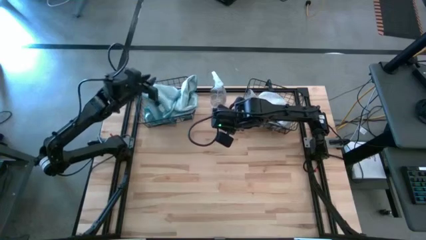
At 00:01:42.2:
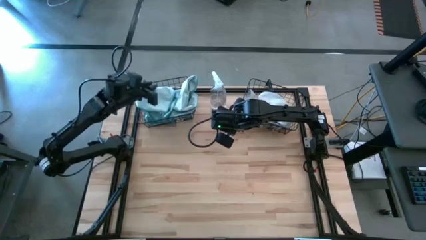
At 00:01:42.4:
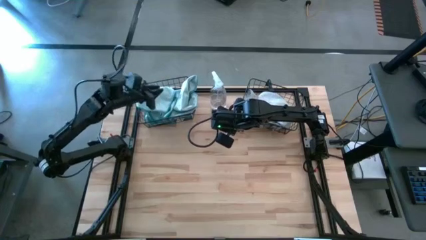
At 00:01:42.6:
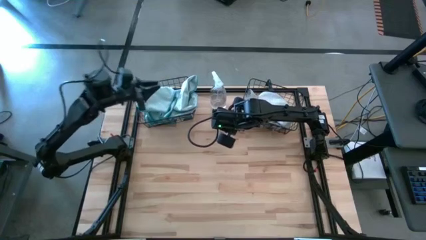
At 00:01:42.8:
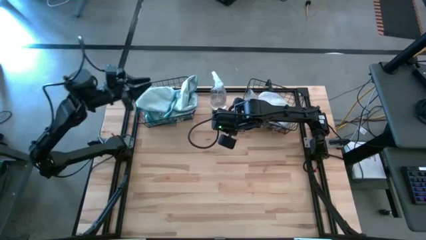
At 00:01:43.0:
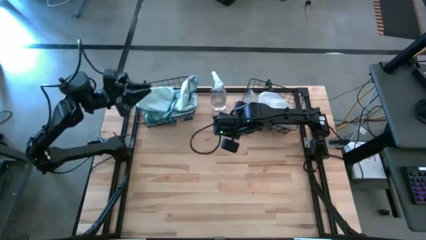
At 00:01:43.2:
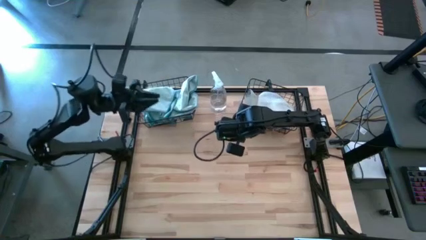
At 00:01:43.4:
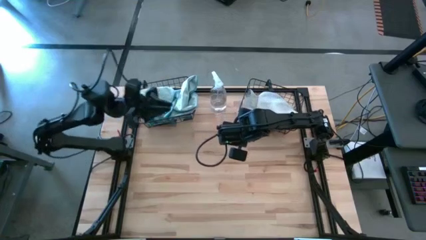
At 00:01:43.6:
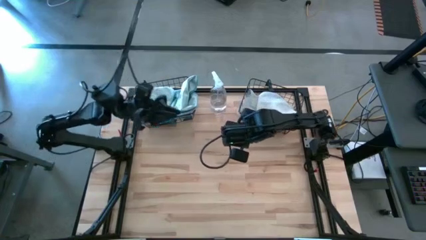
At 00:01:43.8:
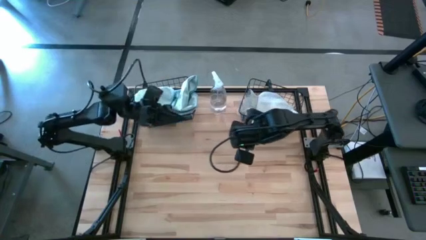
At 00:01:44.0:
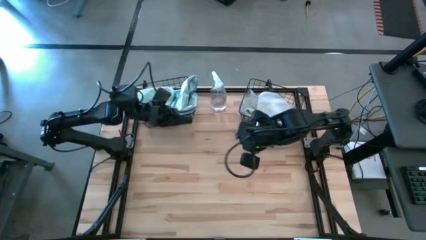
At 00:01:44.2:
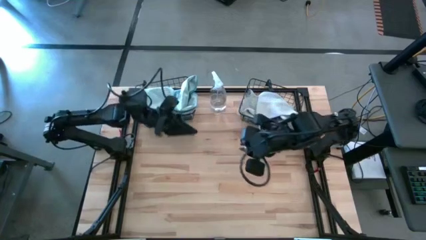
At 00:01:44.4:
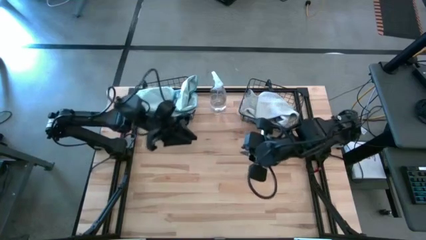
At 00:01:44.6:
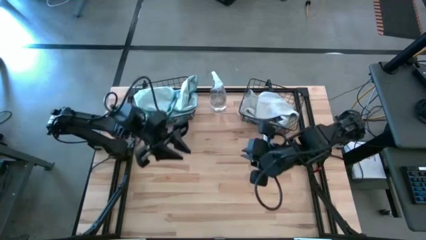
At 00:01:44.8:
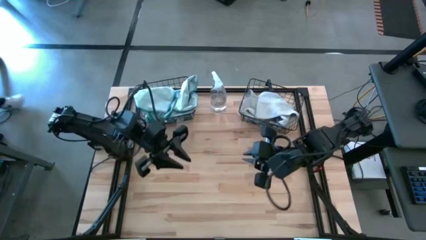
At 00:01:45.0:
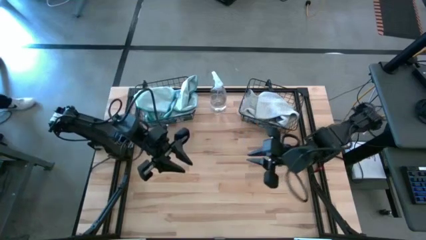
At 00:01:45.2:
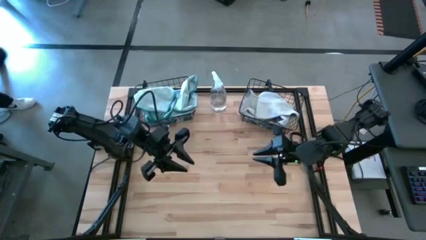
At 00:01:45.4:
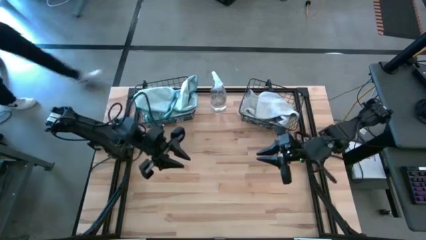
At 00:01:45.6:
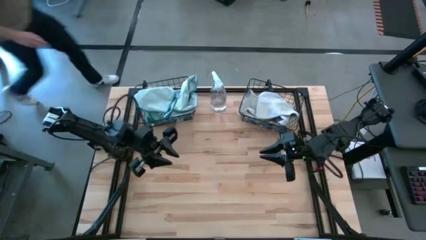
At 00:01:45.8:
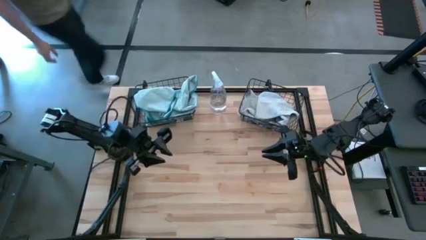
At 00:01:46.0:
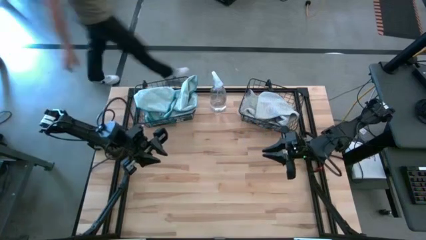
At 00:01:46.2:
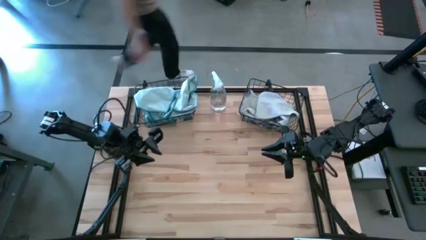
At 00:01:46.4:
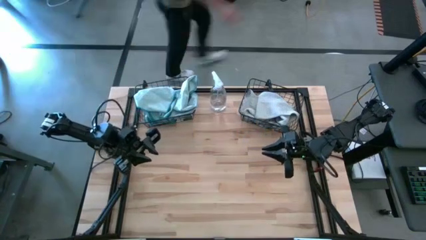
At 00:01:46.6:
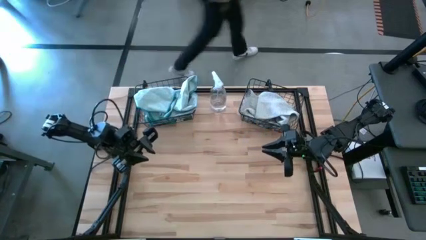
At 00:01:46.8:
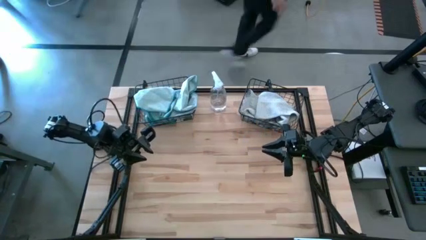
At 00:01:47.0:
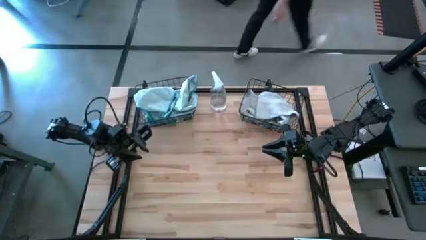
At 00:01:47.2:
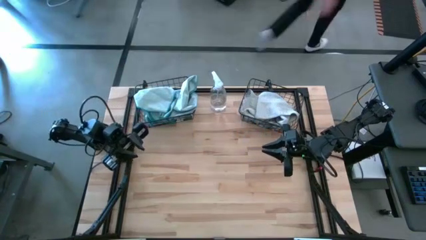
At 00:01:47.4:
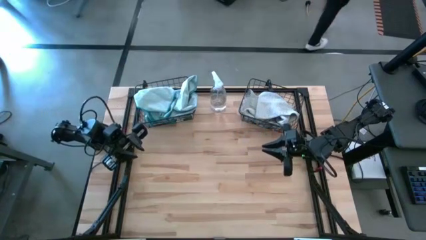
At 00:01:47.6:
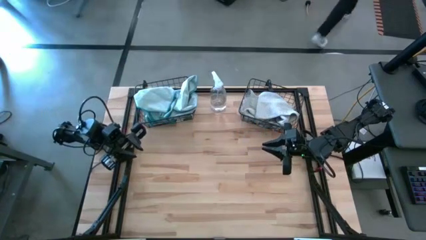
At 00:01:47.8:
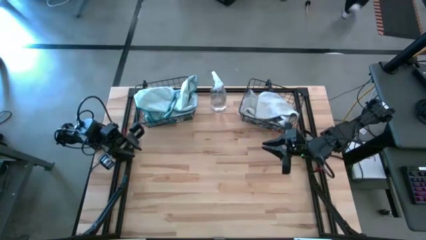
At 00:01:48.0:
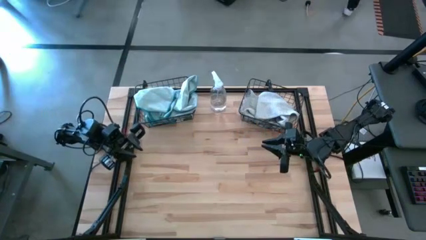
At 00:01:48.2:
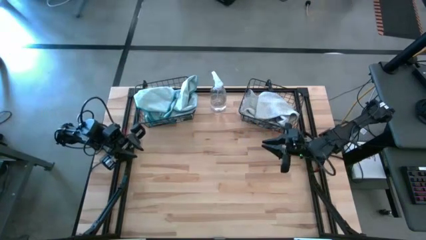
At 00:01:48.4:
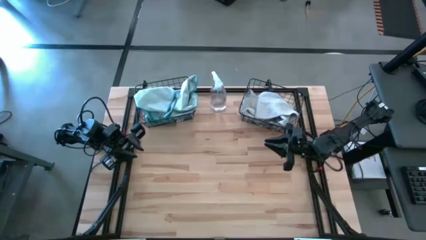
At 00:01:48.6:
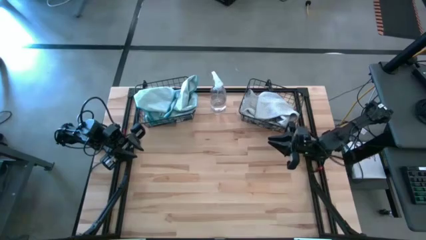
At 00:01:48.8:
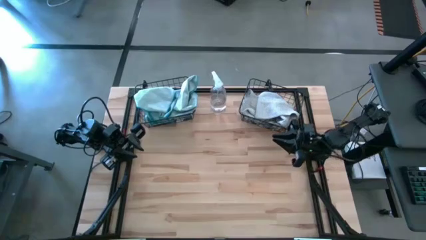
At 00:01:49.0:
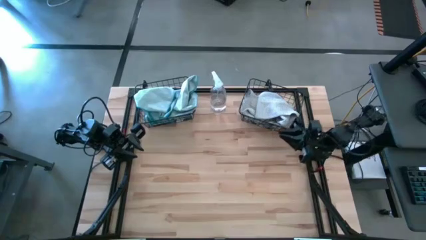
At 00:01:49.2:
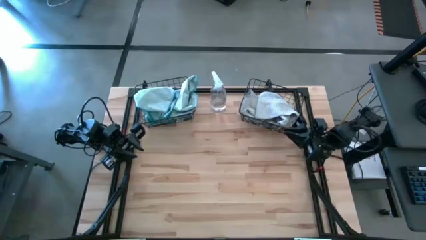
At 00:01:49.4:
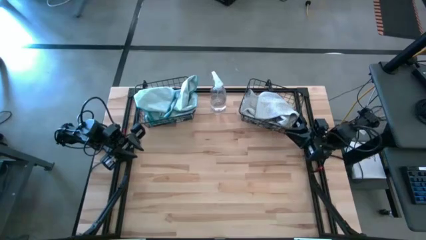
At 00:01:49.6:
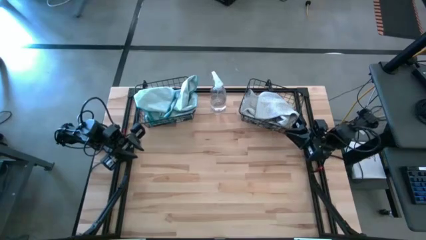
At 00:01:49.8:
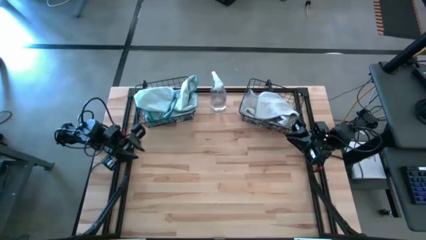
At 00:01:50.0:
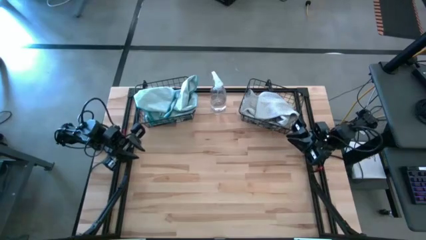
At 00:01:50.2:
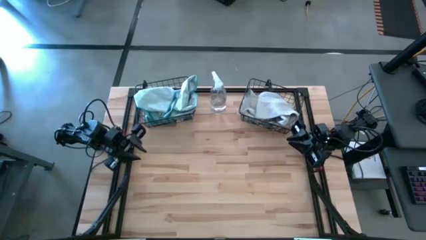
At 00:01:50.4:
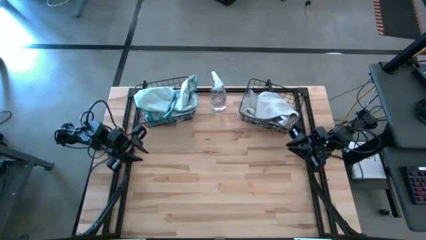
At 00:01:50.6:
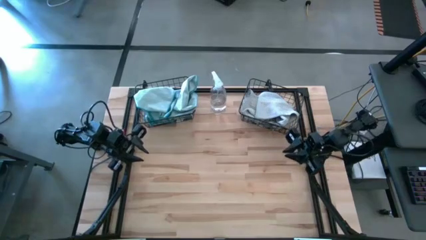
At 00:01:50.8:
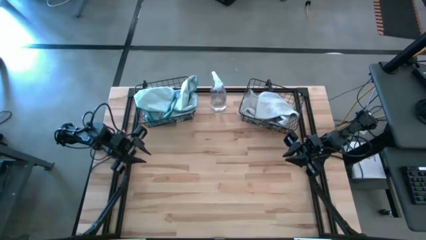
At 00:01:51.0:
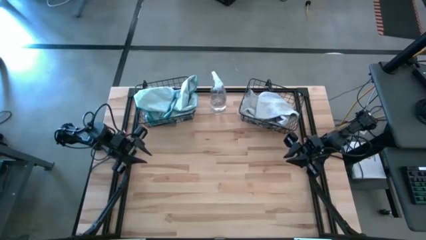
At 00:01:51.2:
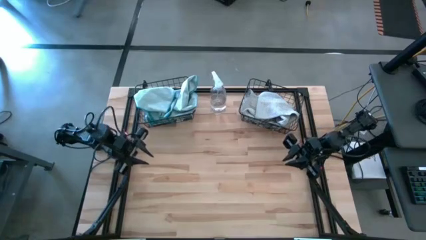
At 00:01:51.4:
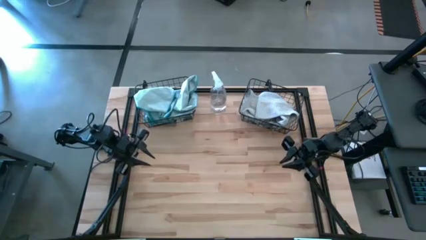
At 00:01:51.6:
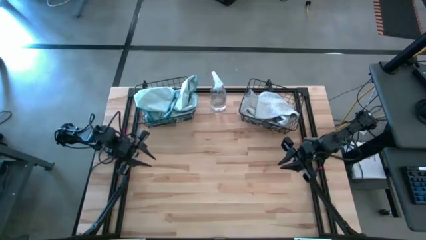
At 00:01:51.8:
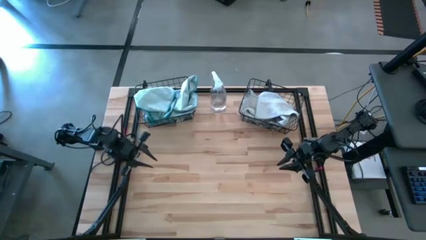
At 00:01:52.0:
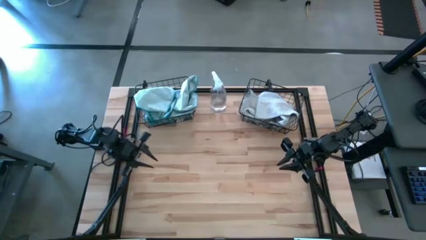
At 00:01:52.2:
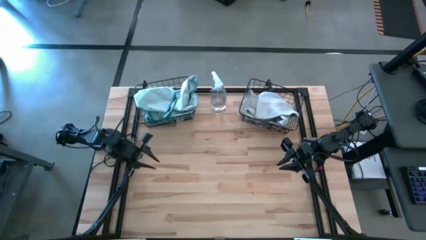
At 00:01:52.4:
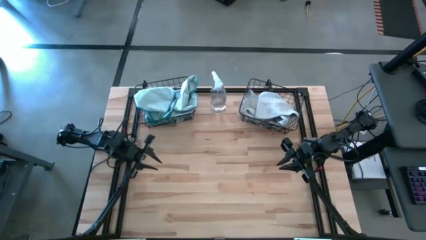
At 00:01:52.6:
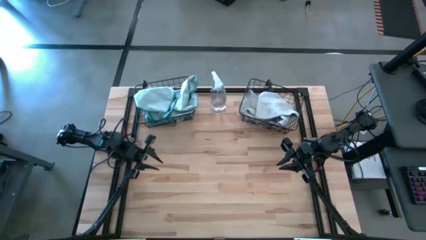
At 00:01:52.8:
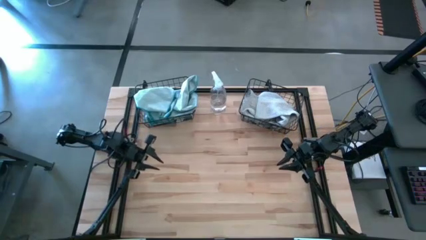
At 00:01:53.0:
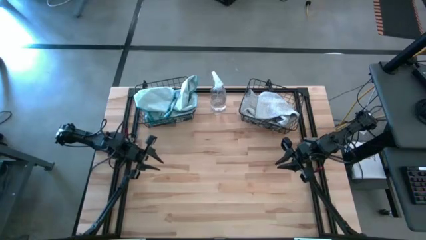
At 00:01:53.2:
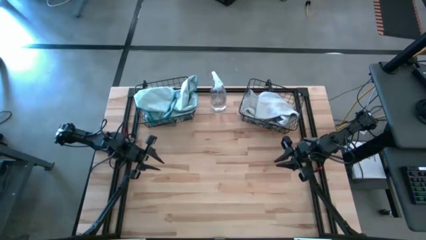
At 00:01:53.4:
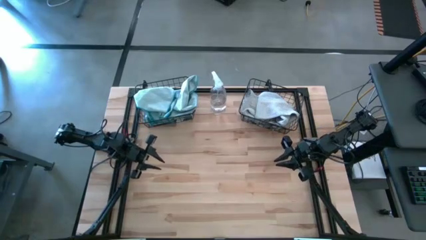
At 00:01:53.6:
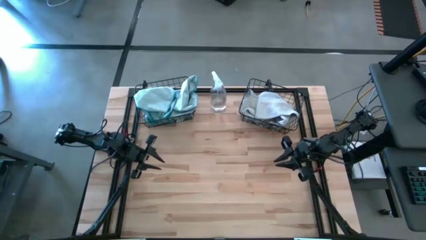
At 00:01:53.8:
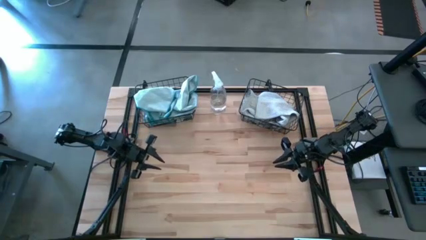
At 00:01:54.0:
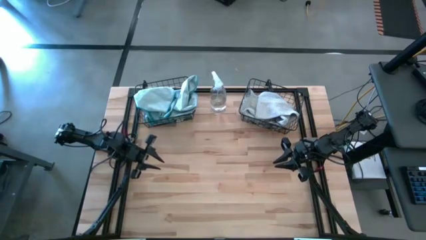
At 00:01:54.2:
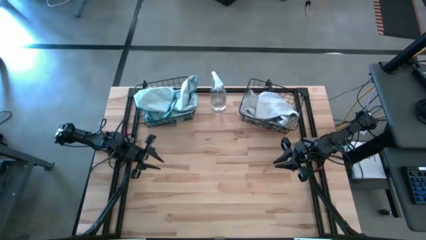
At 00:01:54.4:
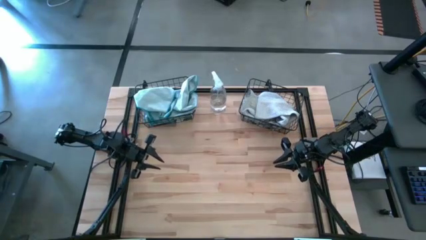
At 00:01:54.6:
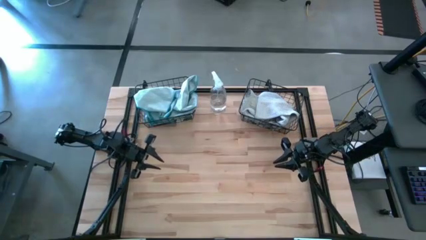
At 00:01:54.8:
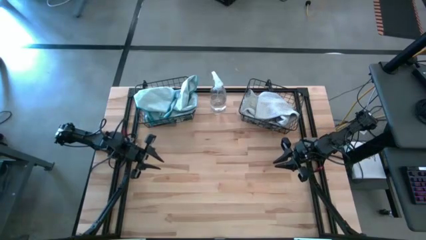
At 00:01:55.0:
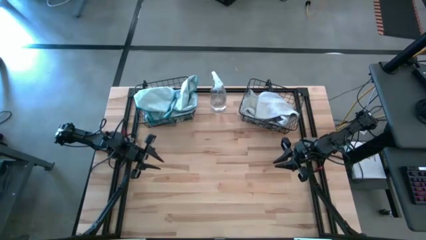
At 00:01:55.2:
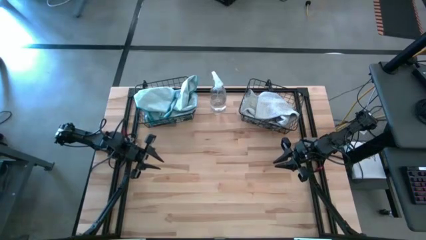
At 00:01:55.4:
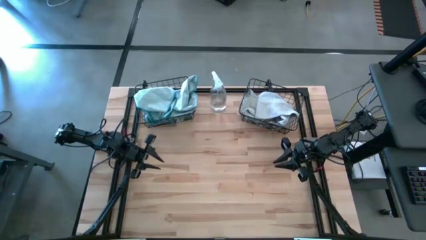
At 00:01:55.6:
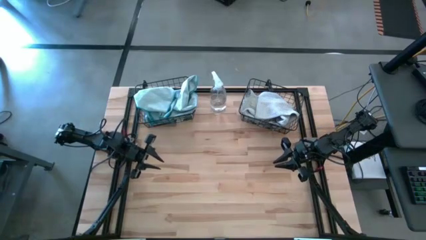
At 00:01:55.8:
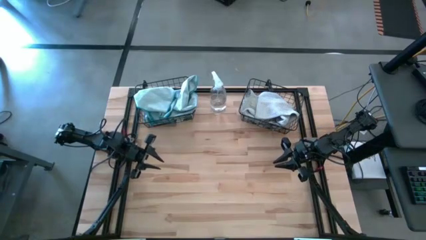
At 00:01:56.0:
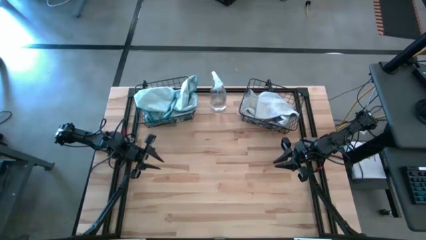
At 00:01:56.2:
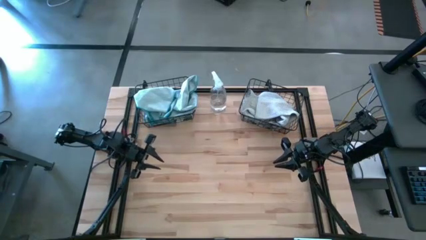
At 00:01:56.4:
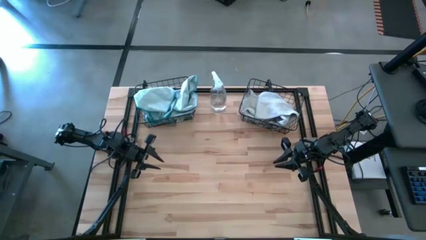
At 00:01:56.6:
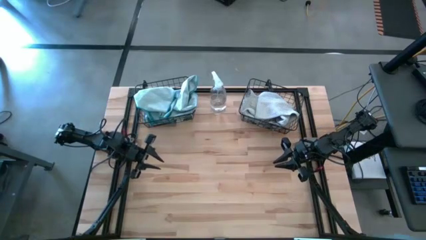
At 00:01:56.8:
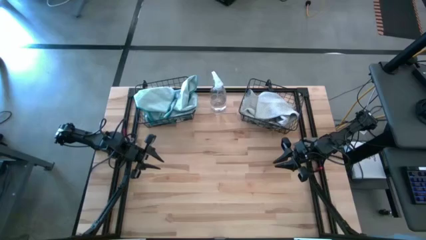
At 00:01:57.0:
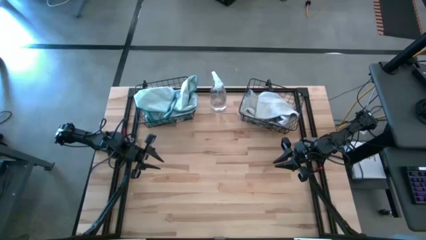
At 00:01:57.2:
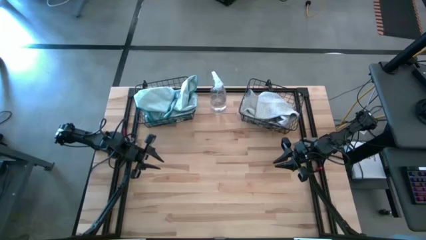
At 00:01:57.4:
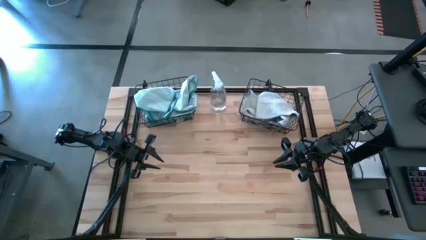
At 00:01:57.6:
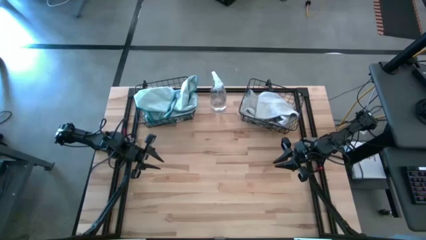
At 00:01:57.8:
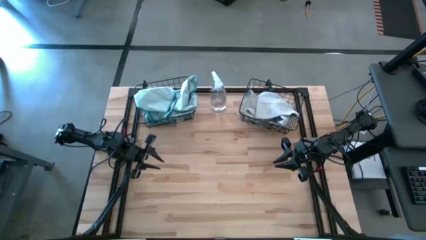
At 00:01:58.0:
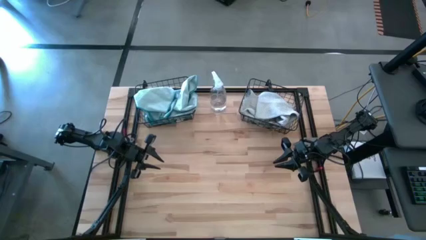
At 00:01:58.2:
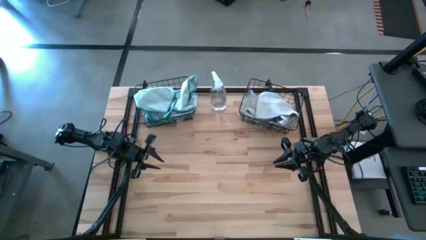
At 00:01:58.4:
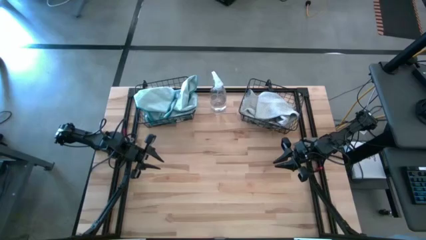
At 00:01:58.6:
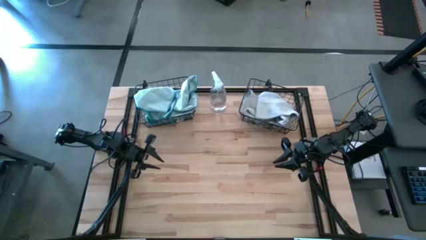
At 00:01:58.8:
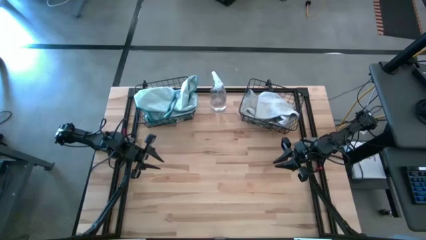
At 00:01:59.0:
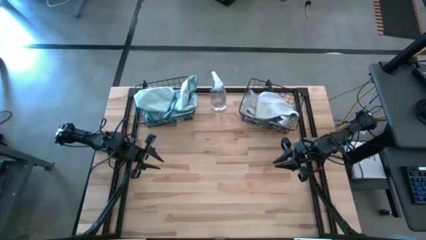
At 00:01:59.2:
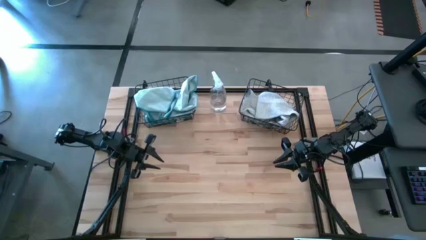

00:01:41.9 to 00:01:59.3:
Task: Sort microfiber towel by color & place in baskets
Return to Home Position
